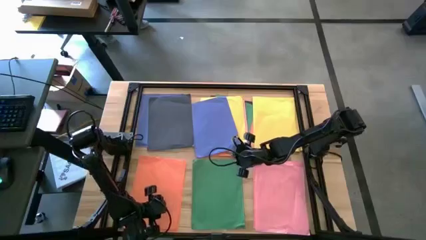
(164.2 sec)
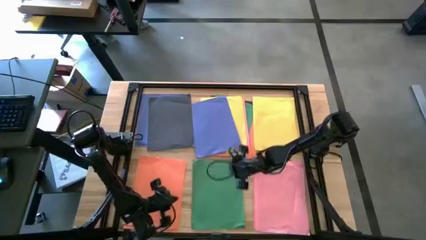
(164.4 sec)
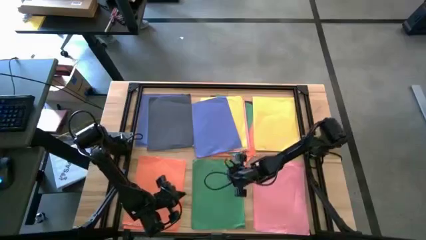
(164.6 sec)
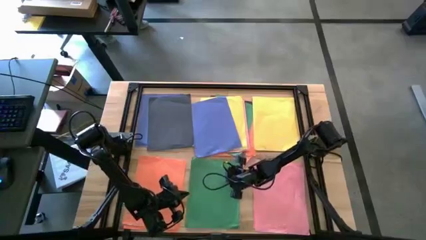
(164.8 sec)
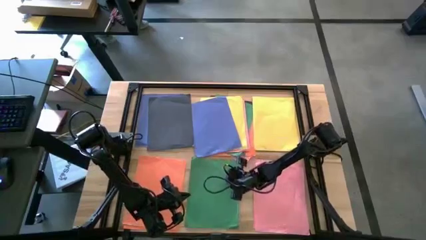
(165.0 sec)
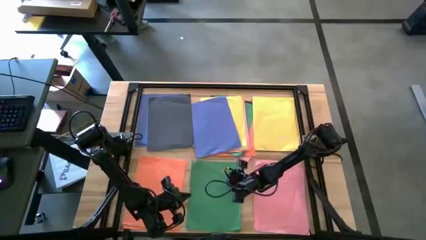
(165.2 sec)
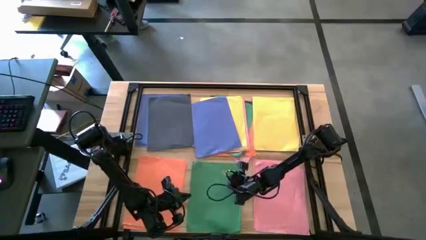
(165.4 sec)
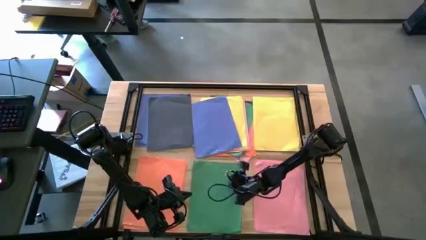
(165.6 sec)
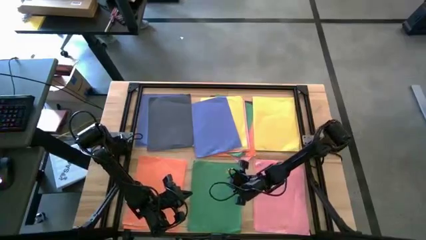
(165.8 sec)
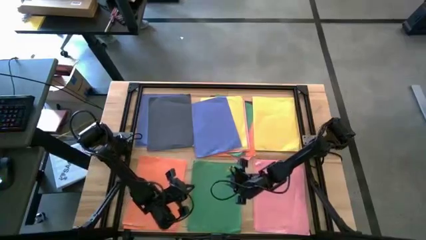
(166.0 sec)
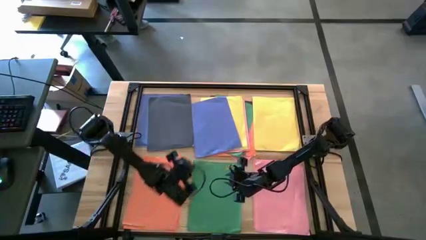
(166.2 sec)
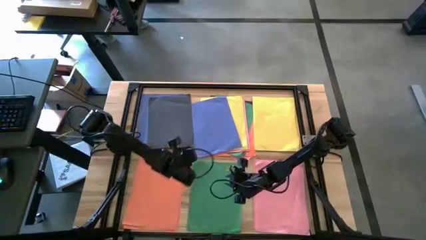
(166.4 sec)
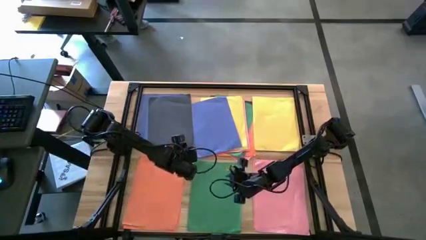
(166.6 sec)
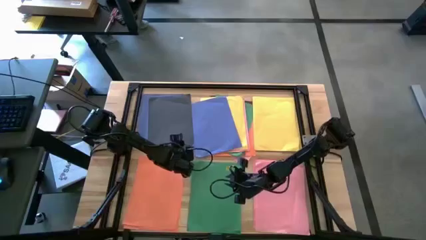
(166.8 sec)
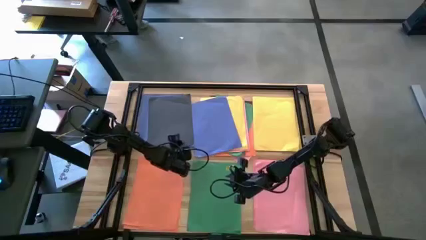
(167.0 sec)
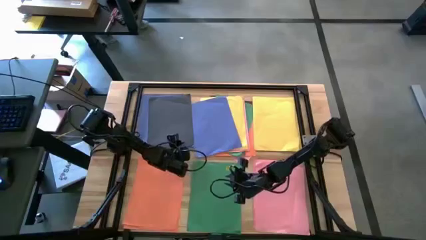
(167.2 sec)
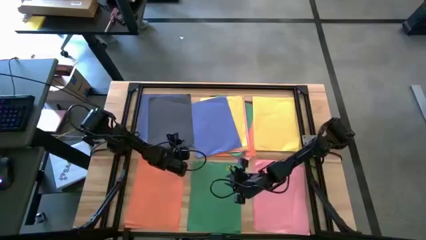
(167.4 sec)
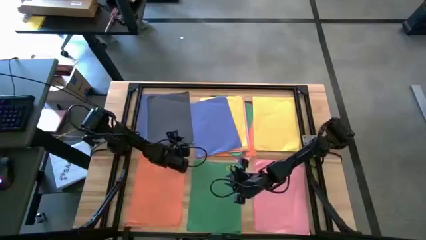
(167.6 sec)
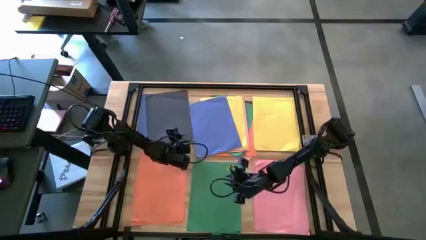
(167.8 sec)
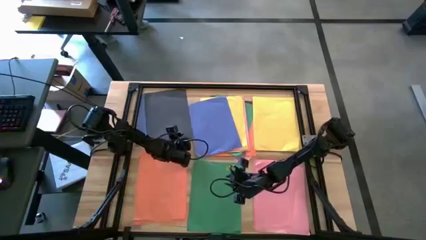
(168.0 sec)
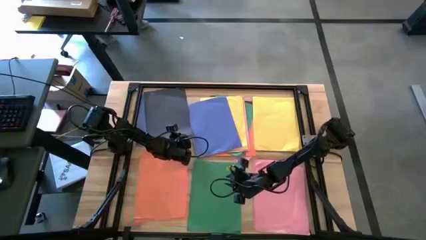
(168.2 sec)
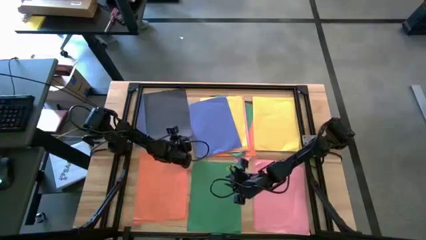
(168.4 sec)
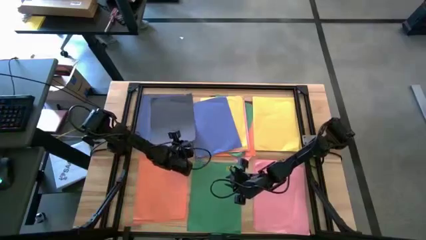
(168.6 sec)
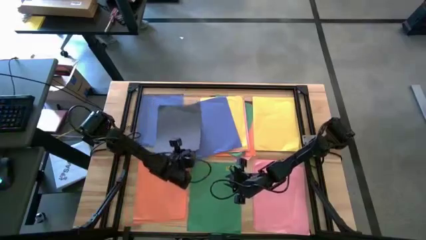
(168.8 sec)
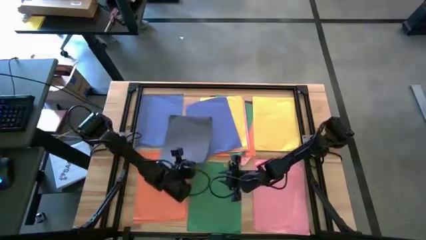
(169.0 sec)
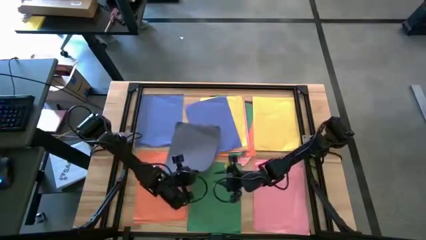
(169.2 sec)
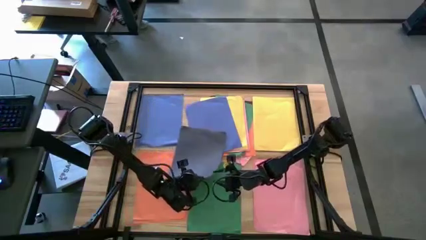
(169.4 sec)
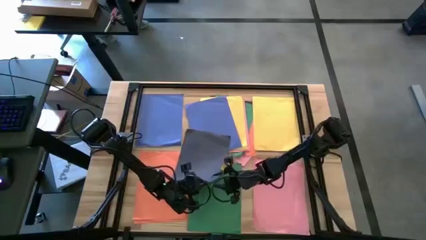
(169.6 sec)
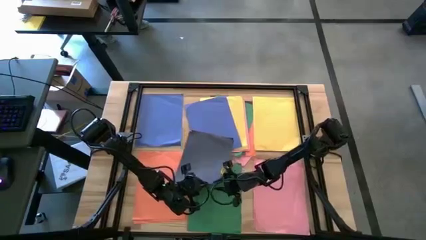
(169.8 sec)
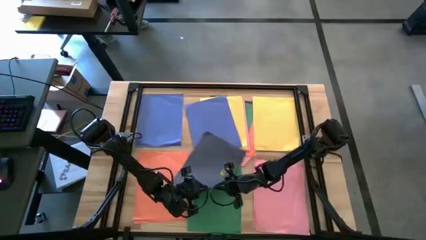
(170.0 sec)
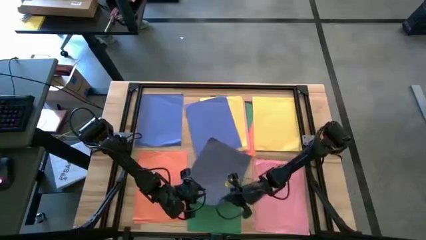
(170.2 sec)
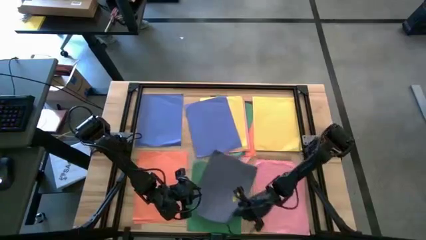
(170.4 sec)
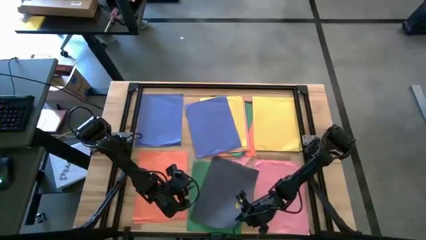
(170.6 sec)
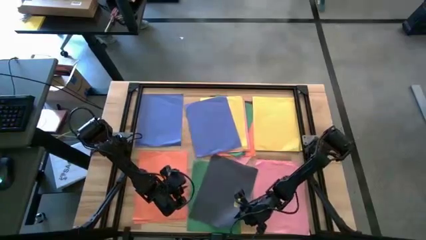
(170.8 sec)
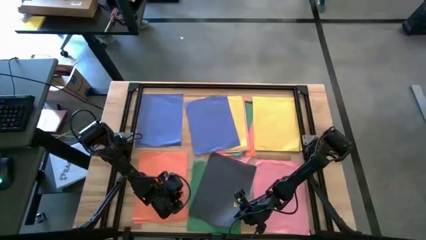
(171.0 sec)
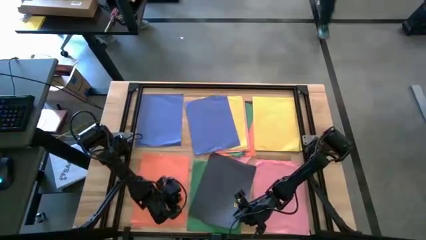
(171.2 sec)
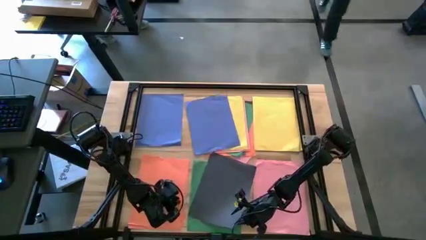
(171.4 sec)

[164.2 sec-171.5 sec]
Task: Organize paper
Move the black paper on the green paper
